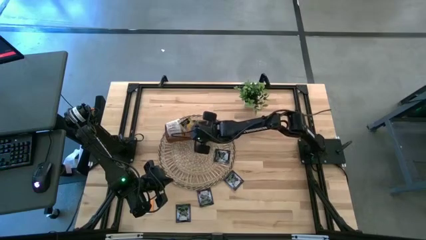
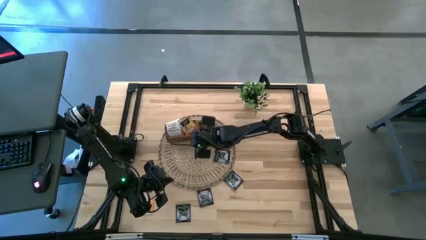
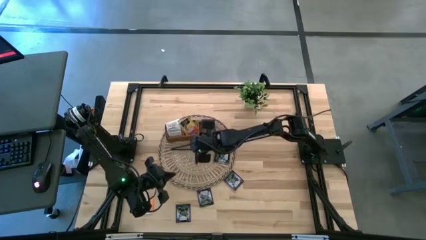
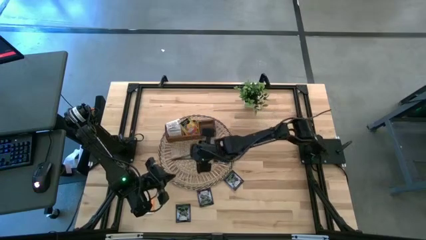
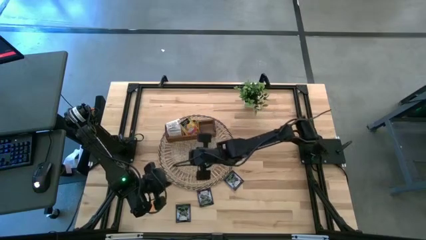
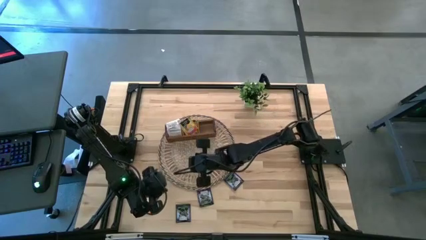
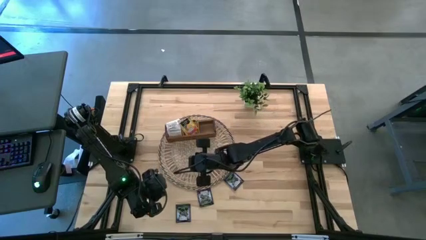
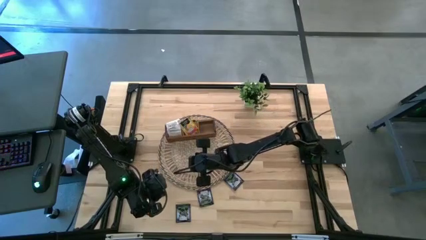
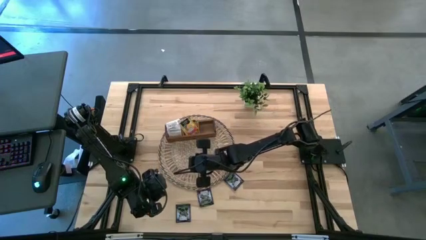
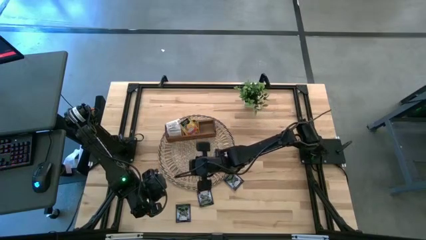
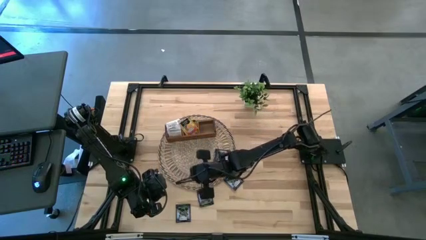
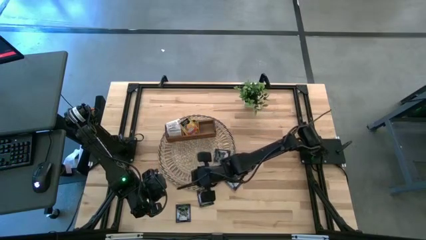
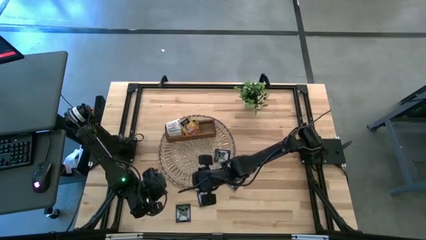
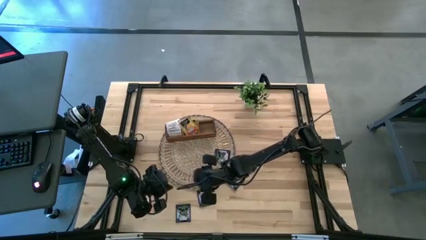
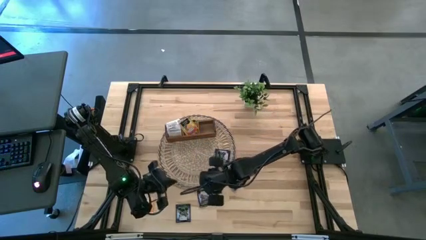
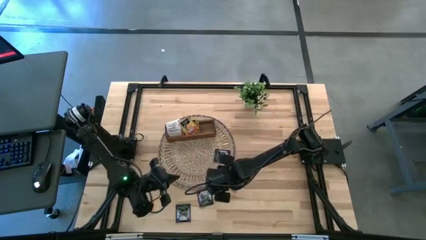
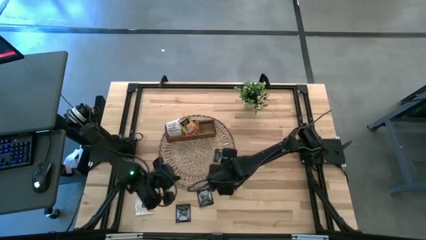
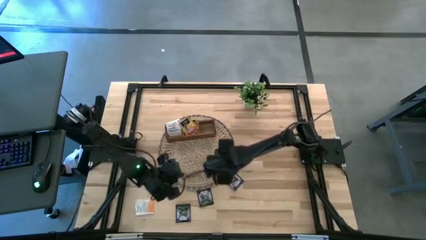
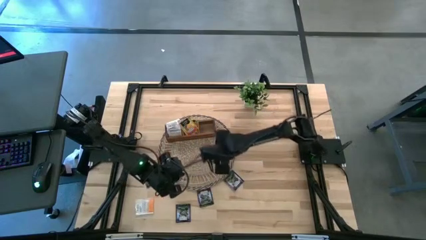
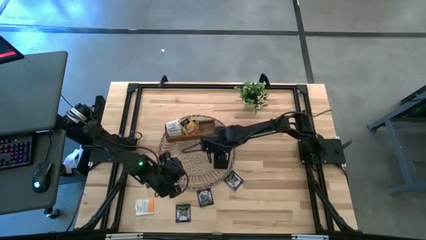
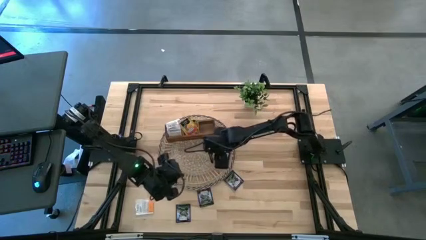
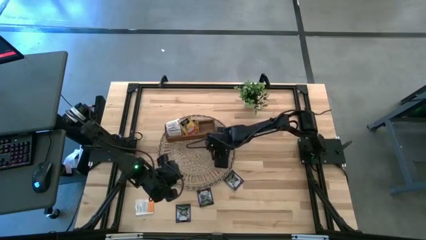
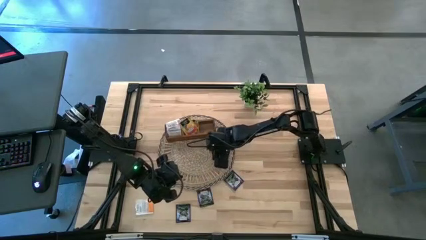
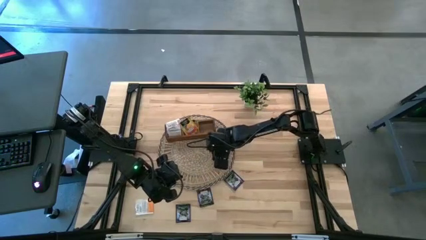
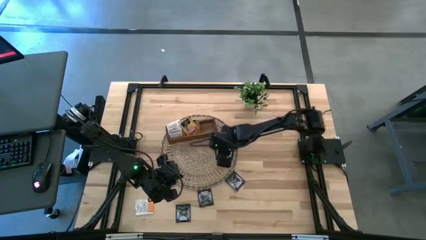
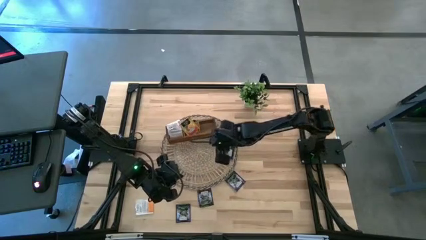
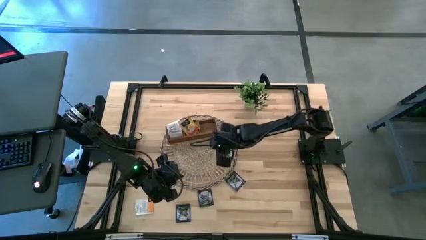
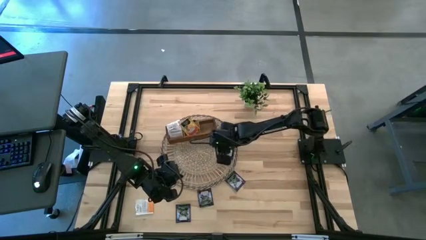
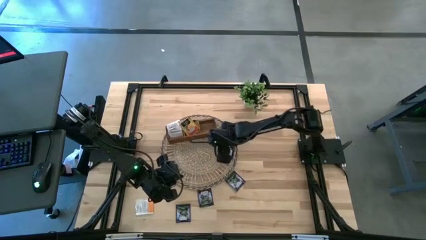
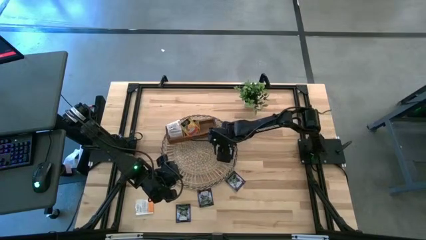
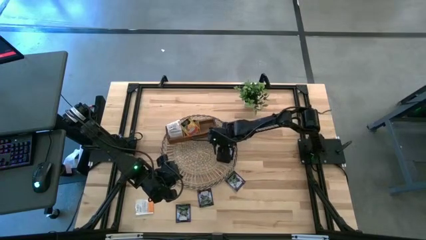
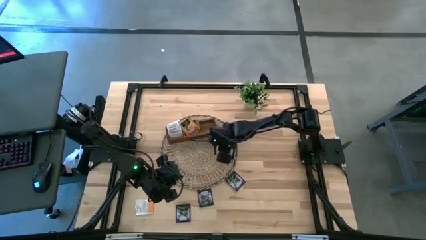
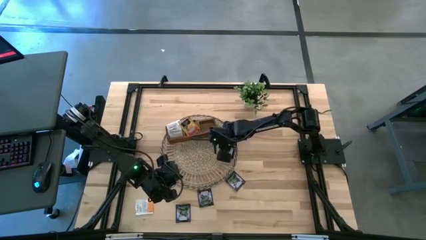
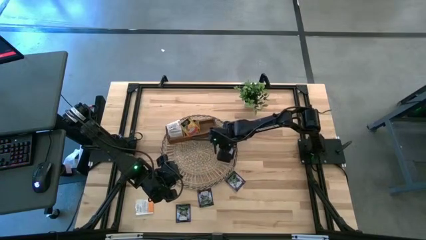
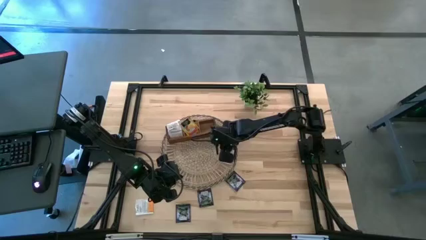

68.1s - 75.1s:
Task: Pick & Place Tea
Put the violet tea packet into the right compartment of the wooden organizer

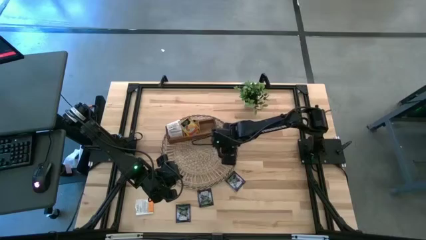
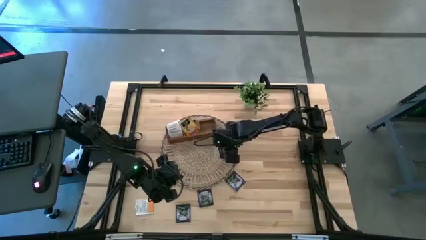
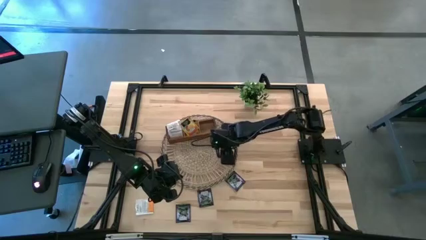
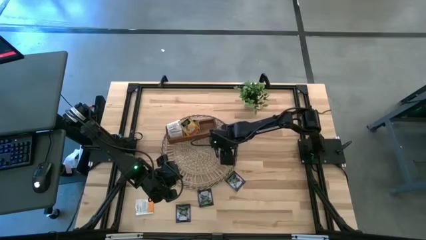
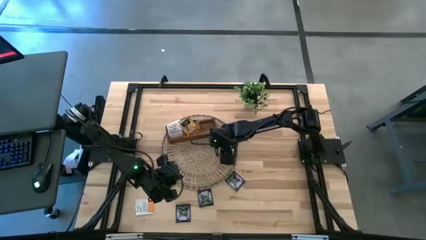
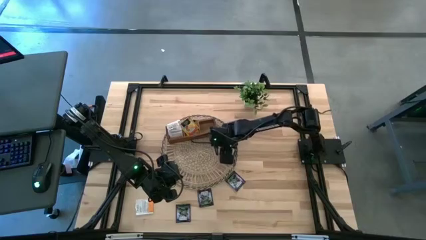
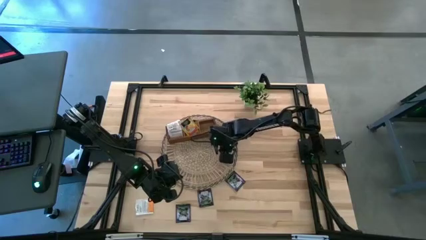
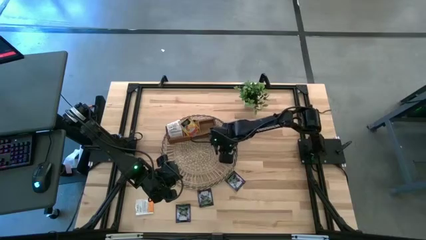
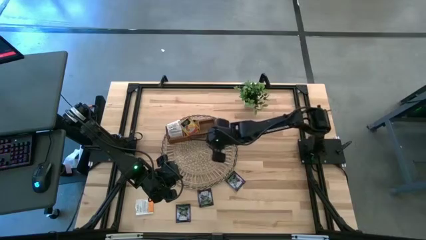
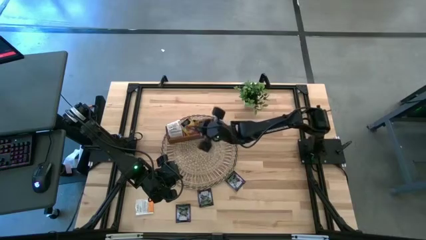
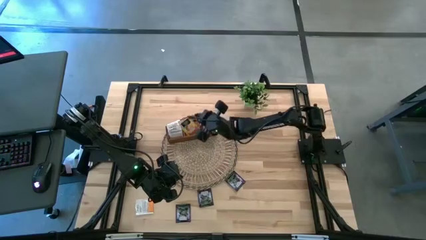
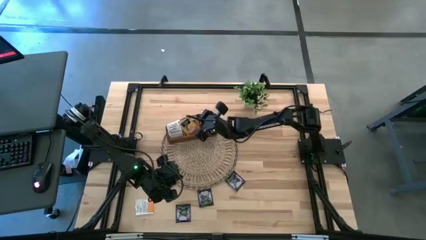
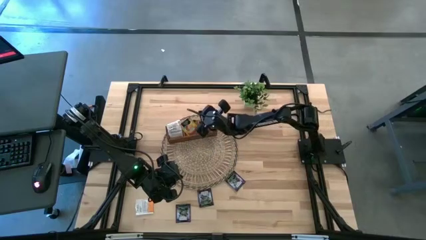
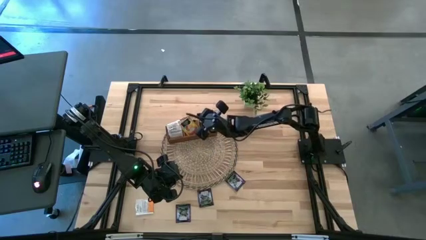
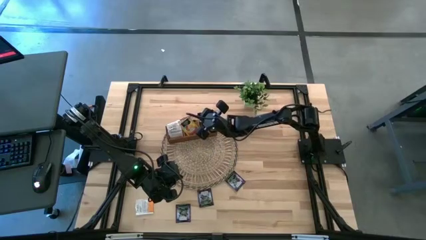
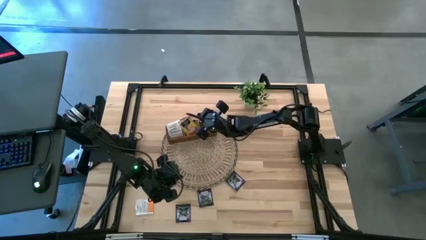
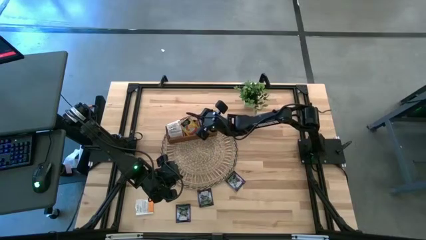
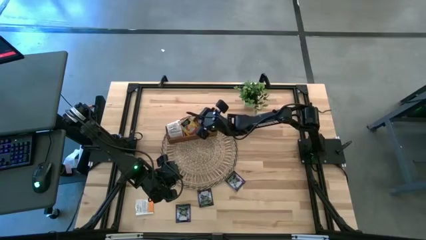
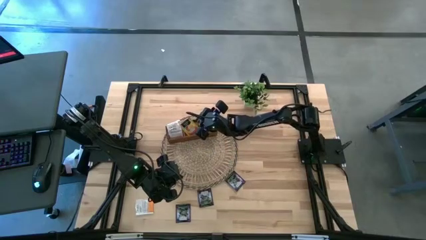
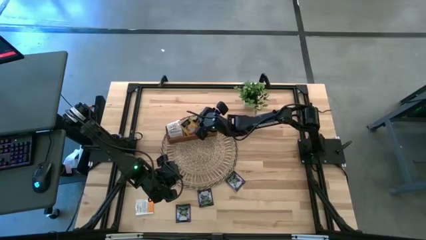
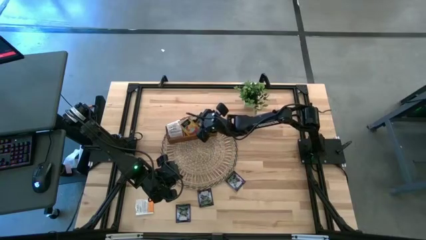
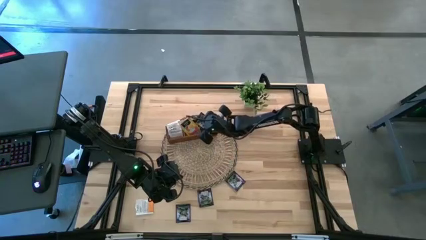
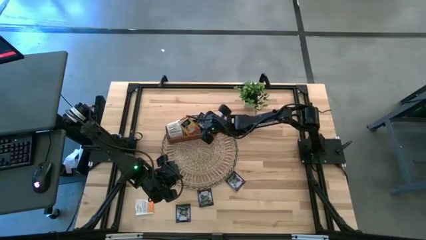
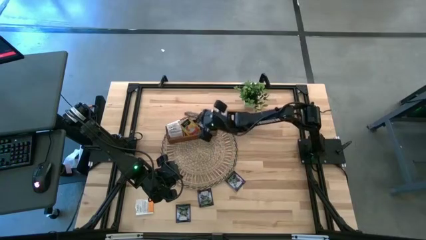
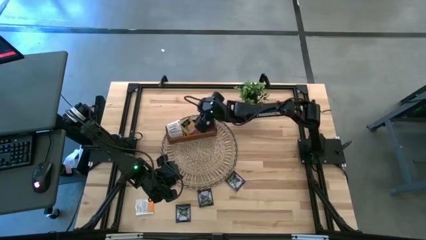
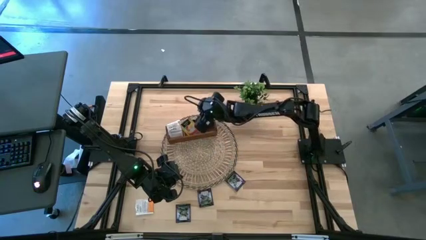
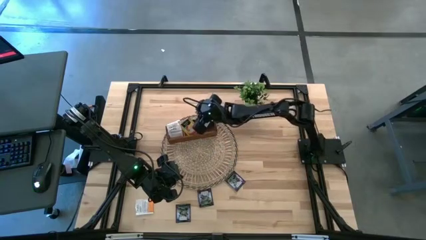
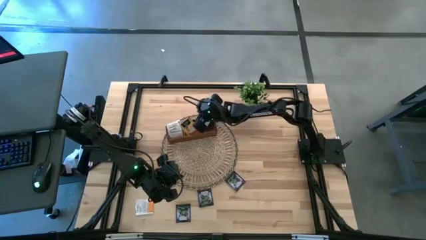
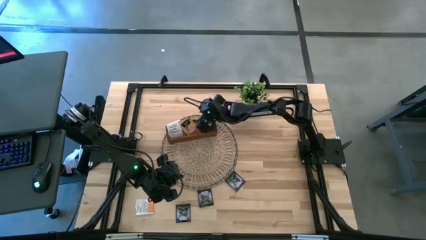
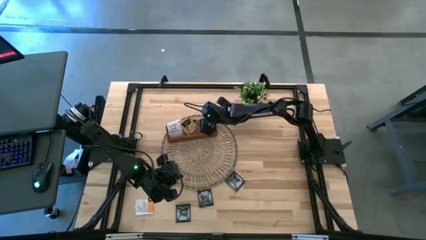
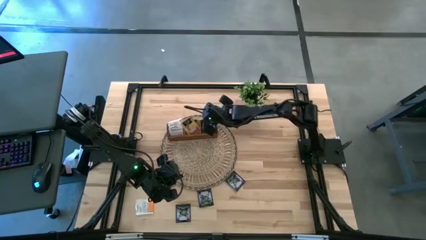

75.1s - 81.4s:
Put the violet tea packet into the right compartment of the wooden organizer

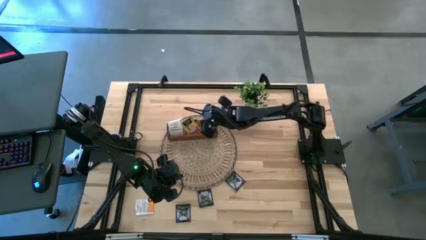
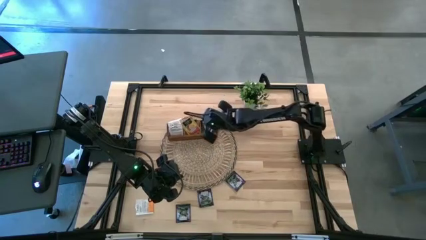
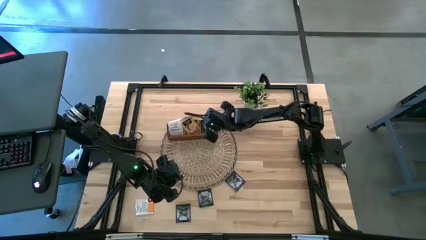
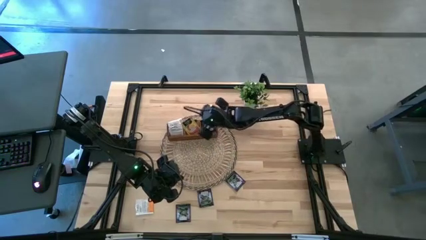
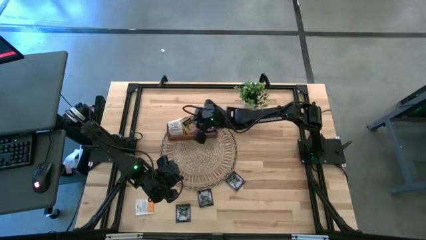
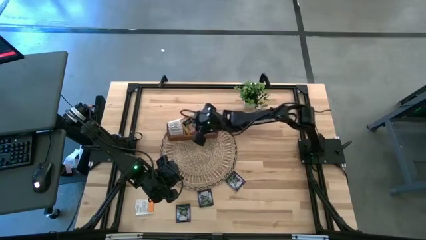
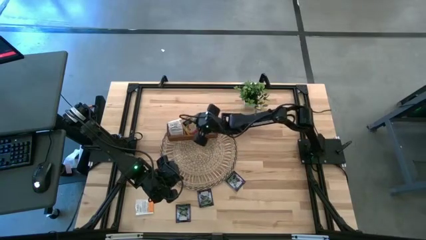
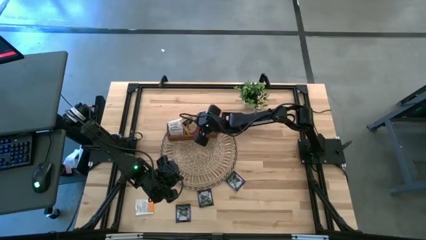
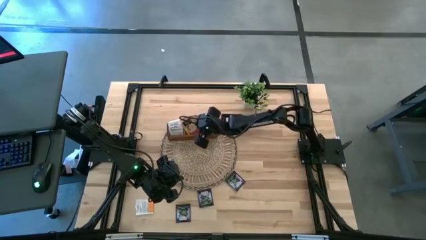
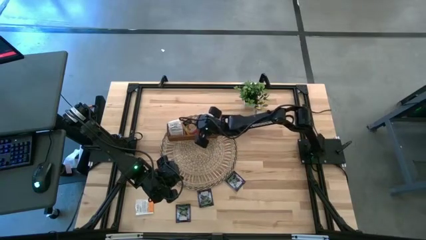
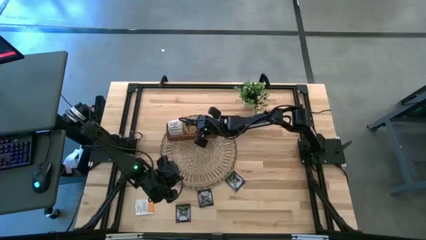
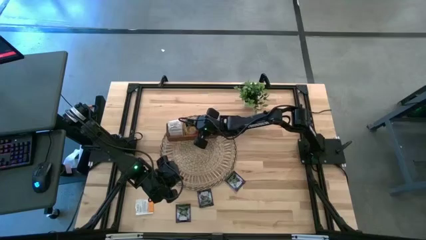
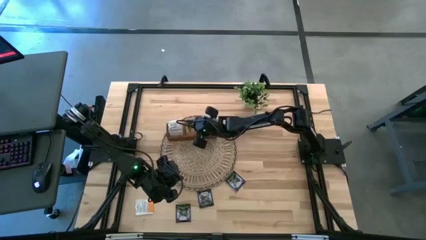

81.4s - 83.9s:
Adjust the orange tea packet in the wooden organizer
